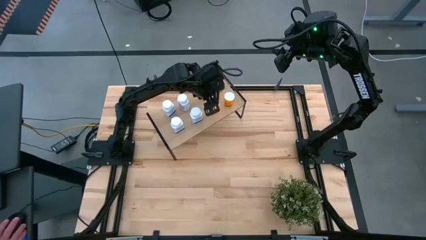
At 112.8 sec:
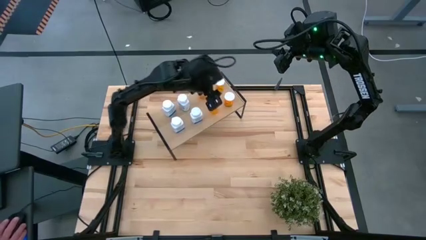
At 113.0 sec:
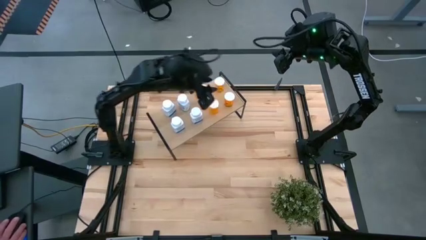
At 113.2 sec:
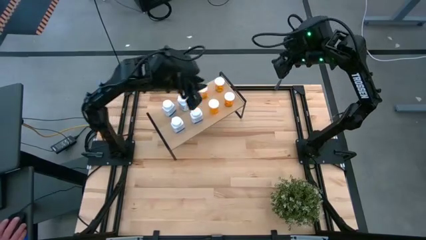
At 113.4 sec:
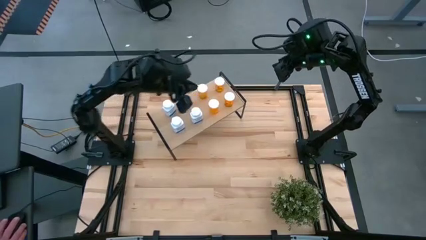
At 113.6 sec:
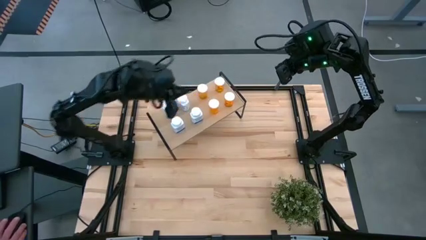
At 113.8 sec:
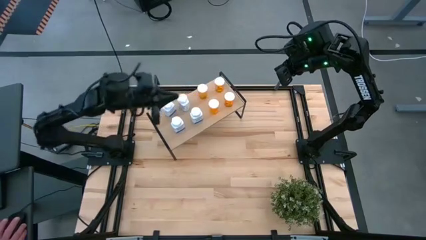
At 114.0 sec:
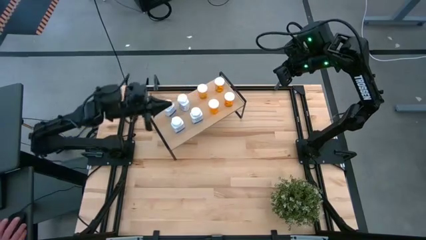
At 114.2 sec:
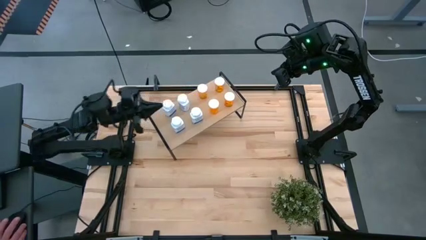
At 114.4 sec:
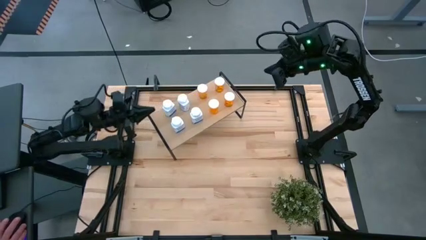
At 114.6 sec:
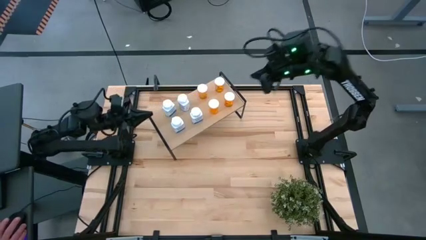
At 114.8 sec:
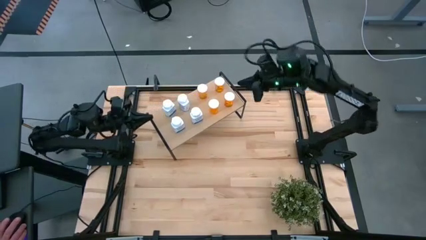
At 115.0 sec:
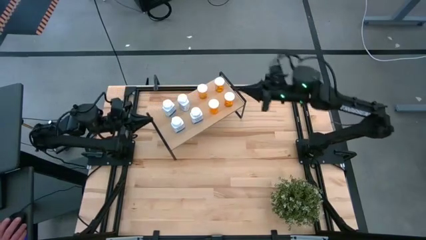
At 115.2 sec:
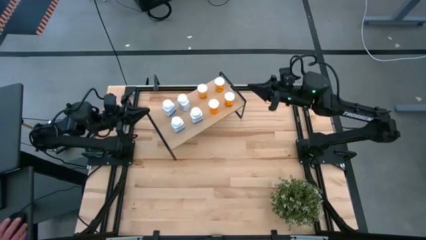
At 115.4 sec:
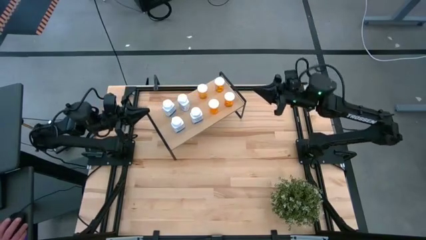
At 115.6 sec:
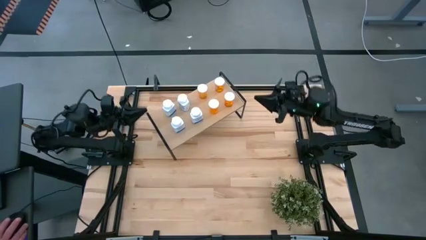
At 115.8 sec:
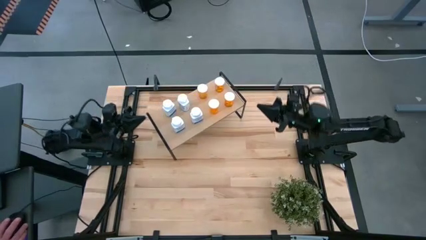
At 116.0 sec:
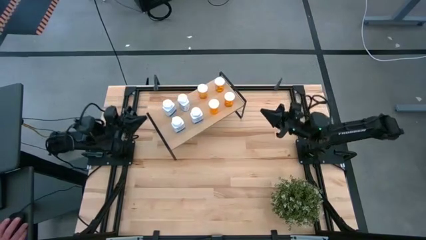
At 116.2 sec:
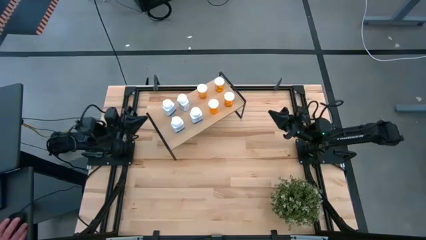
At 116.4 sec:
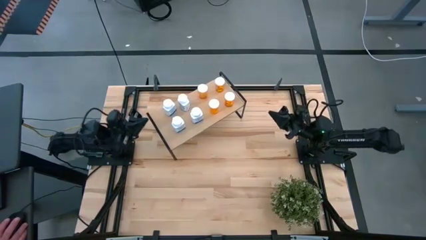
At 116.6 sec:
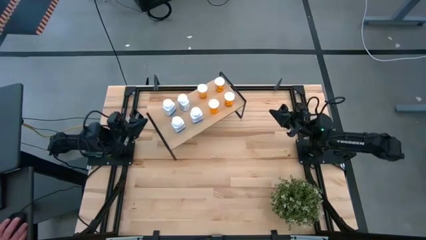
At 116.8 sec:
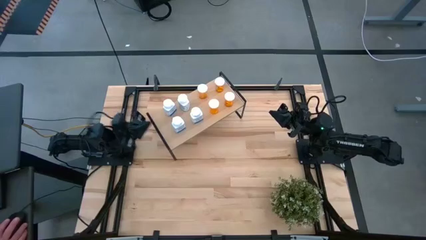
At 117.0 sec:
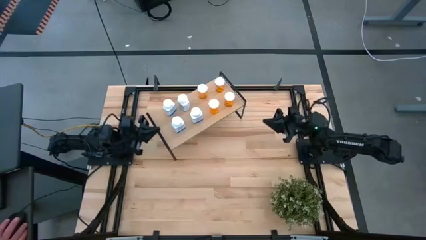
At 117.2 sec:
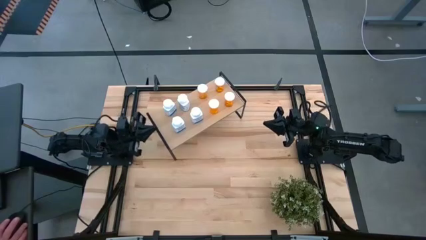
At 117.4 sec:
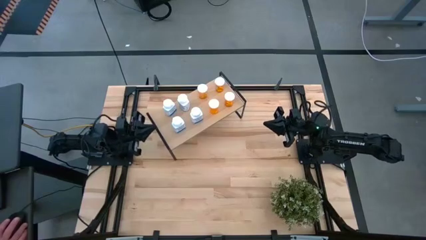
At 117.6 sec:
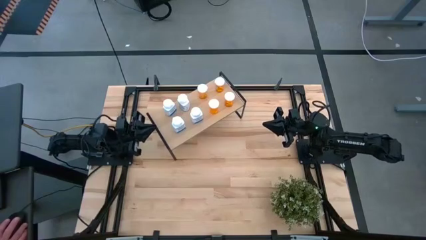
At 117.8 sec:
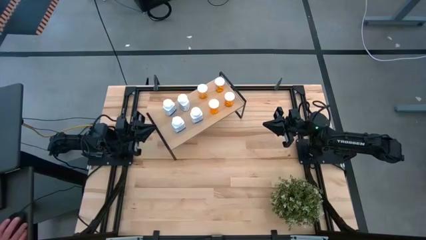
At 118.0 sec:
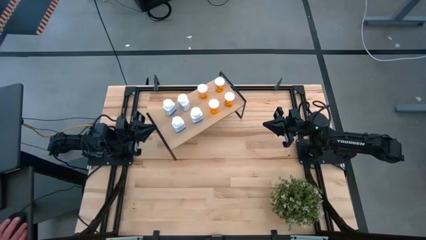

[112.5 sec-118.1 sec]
Task: Pick and place medicine bottles onto shelf by color
Return to Home Position

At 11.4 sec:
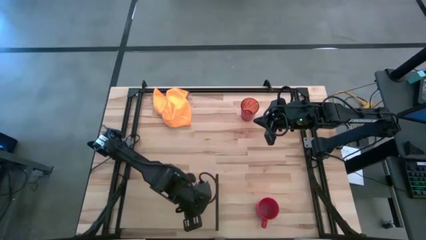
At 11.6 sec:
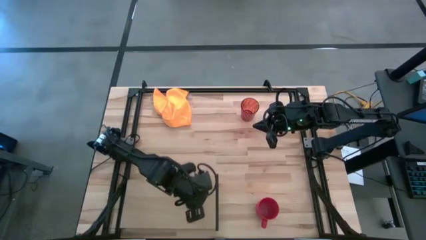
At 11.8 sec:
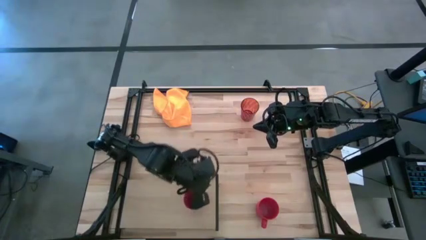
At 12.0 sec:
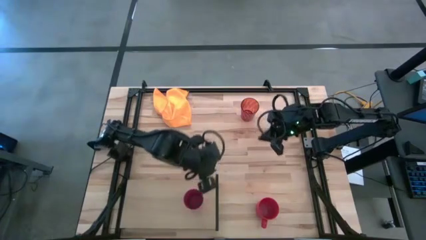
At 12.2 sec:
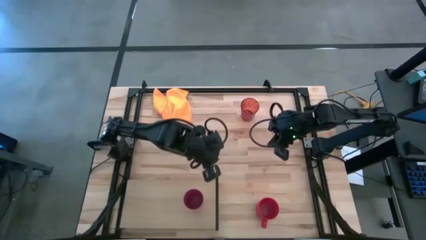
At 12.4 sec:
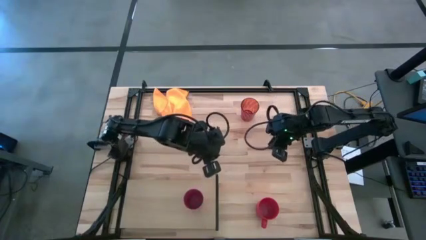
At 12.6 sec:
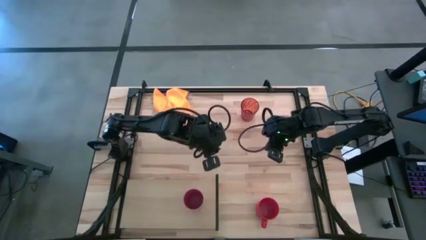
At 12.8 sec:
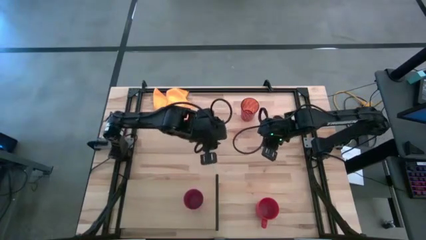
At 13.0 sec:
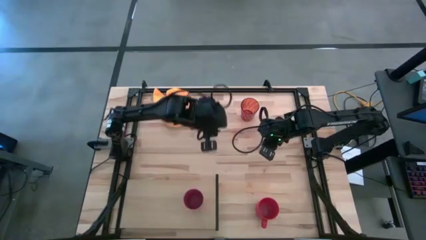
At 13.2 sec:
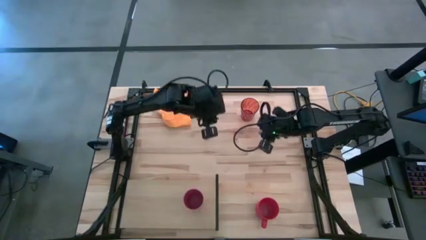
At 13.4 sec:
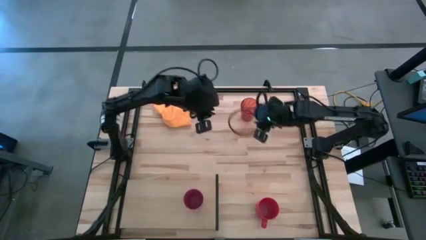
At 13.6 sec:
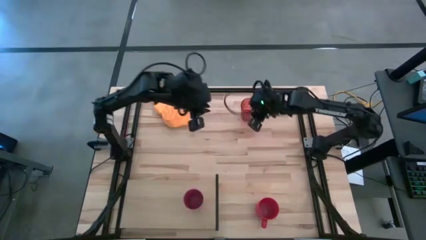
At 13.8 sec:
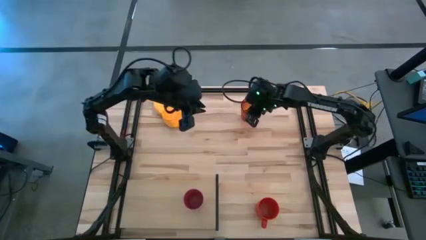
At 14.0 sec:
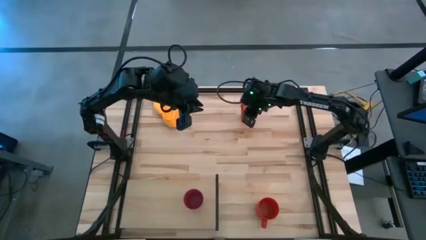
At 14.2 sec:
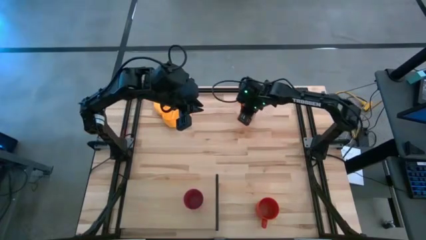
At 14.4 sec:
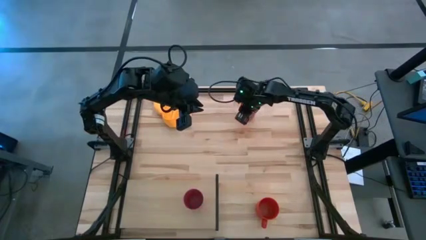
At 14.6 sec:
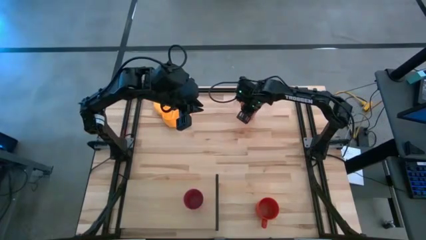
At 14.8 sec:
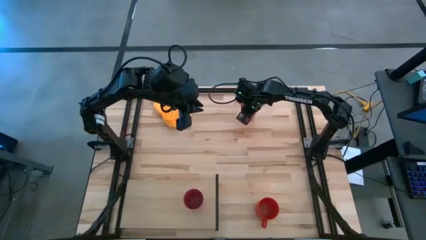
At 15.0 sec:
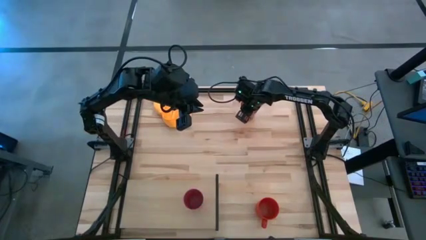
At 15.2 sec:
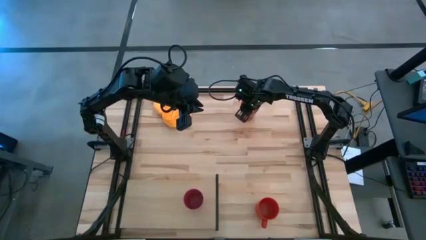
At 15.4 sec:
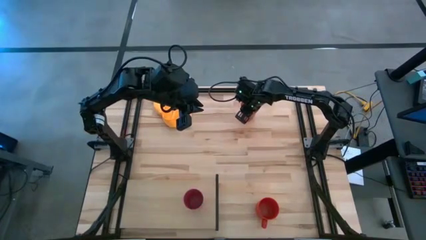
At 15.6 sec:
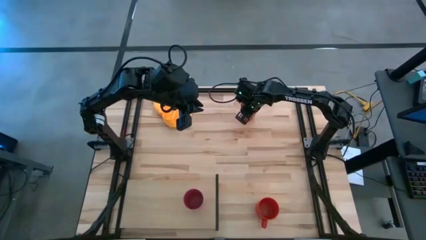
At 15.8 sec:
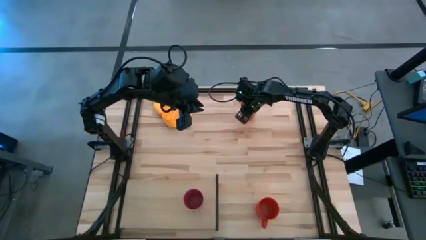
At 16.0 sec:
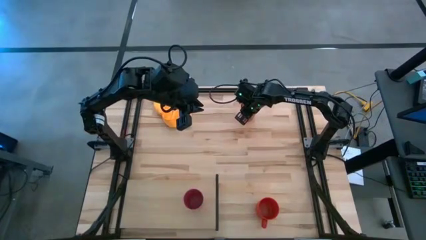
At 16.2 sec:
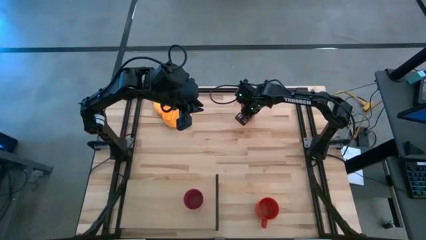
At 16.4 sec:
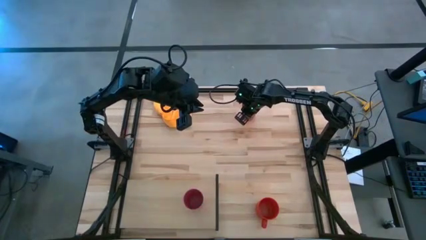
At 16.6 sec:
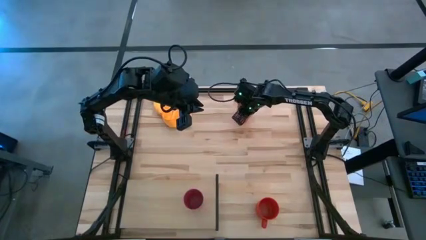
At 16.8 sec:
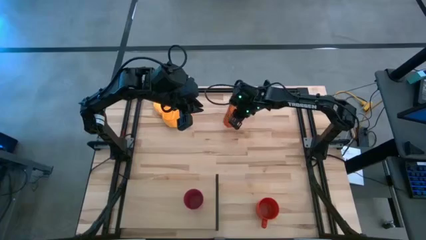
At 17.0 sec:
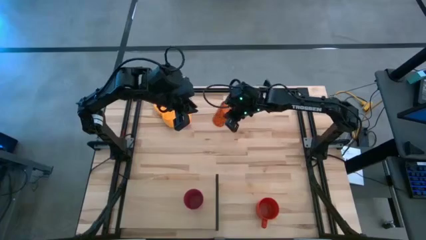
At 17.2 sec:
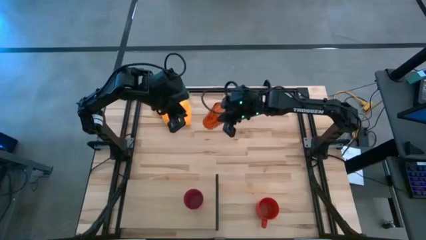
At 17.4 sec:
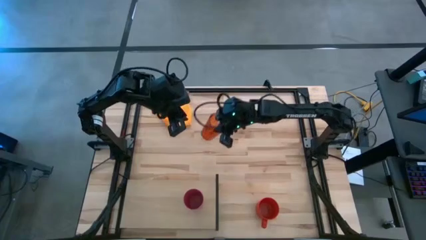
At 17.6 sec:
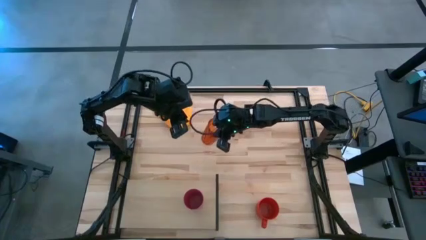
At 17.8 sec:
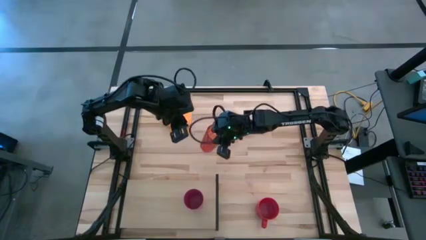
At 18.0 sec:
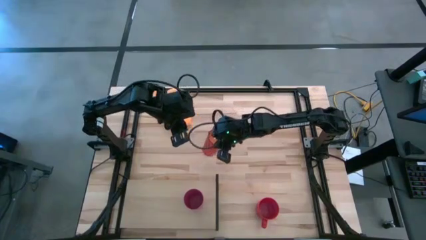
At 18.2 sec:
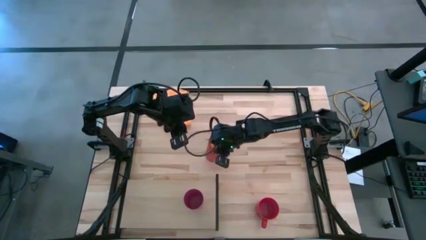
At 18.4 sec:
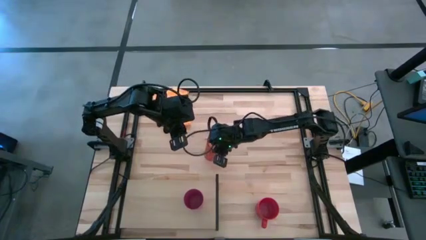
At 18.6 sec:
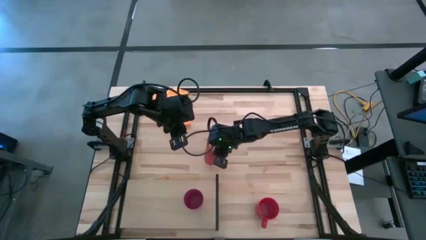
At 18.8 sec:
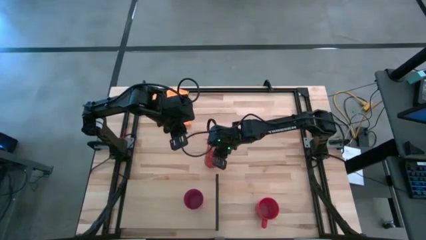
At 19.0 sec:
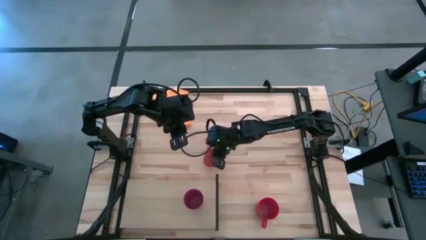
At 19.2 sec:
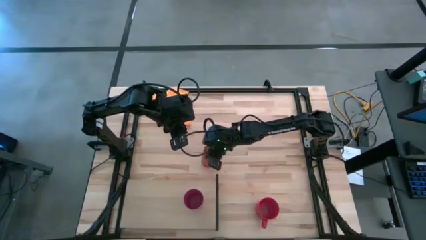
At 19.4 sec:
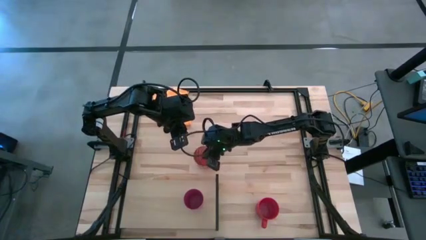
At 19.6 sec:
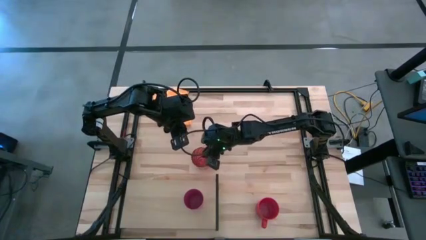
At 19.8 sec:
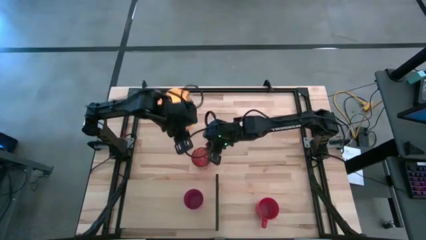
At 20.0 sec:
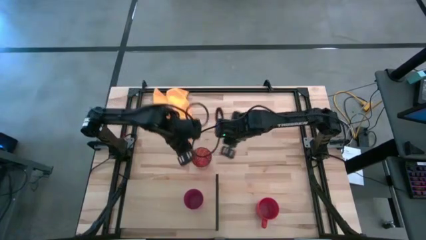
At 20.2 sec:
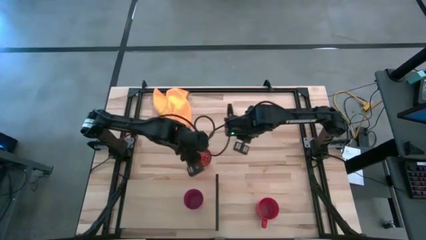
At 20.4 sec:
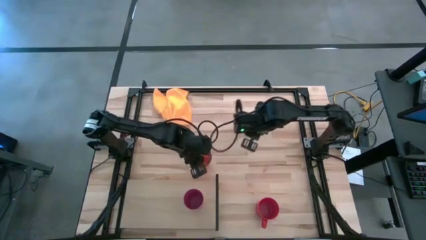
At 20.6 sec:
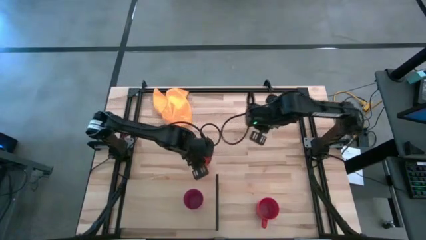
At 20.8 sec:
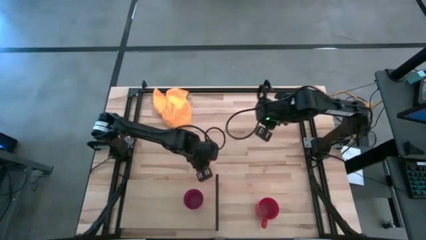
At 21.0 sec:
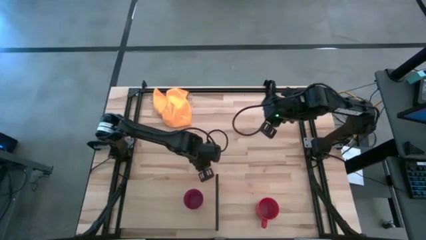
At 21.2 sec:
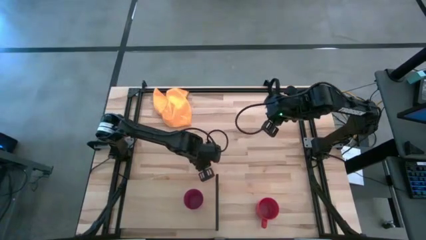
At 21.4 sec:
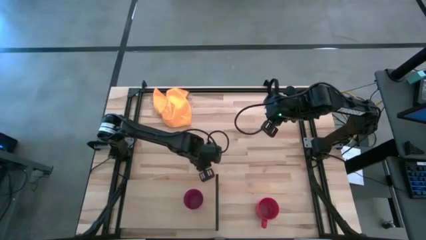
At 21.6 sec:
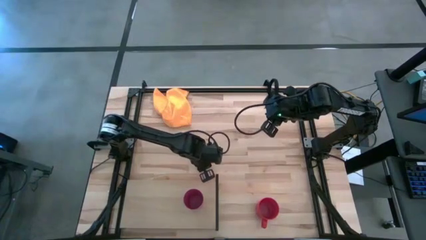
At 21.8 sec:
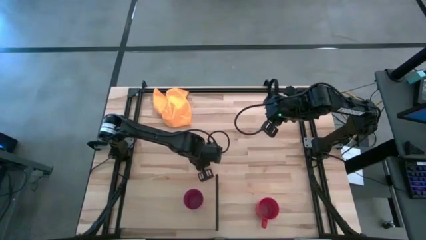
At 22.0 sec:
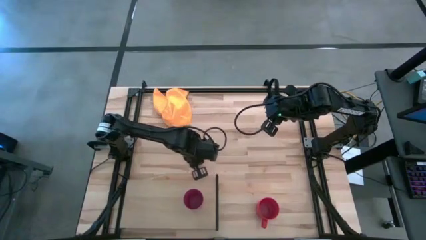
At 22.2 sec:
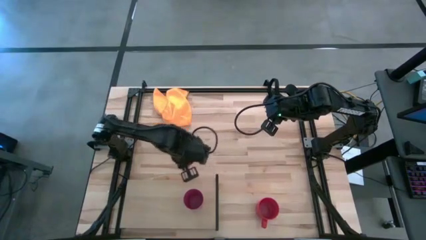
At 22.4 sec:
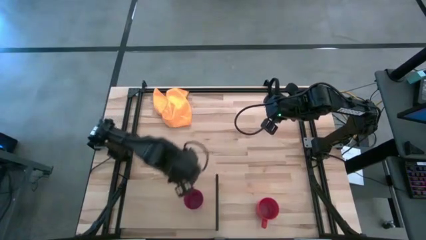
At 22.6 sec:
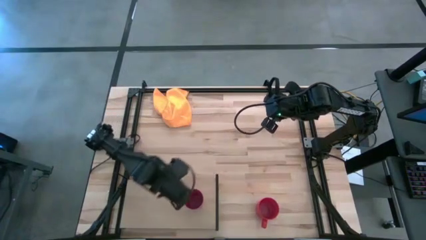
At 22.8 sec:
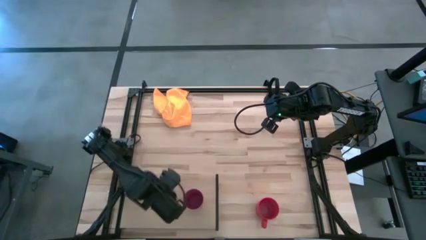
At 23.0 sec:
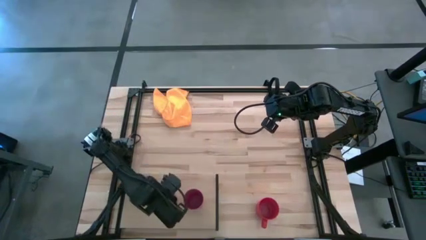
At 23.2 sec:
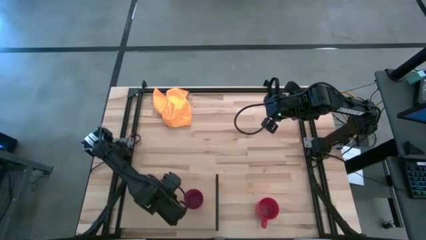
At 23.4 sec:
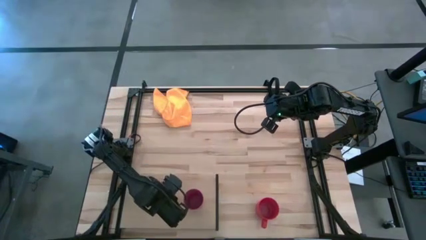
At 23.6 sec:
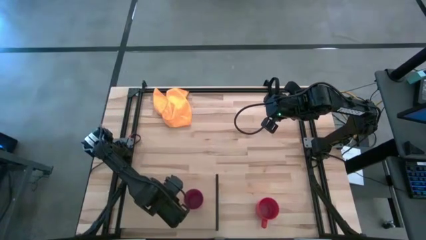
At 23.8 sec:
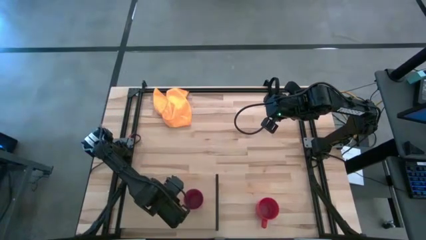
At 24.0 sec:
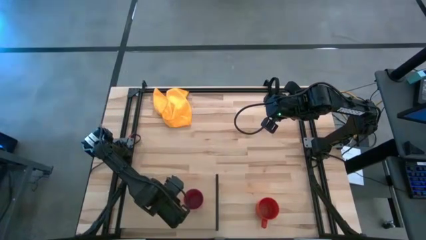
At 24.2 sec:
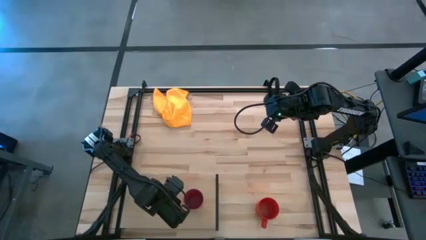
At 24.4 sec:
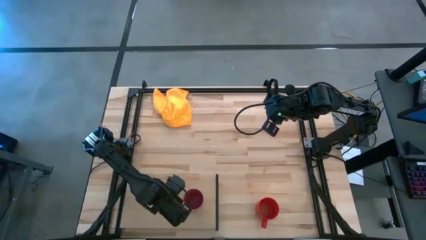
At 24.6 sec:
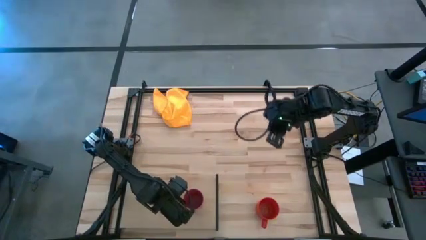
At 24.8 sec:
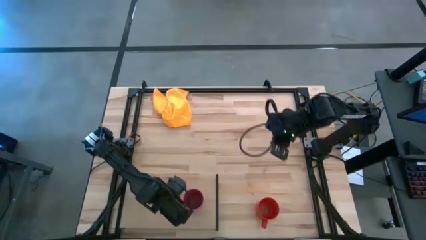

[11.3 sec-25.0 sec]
Task: Stack small to large cups/mugs on shelf
Put the orange cup on the shelf
